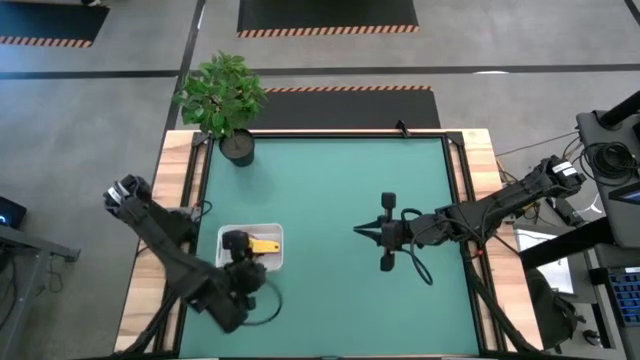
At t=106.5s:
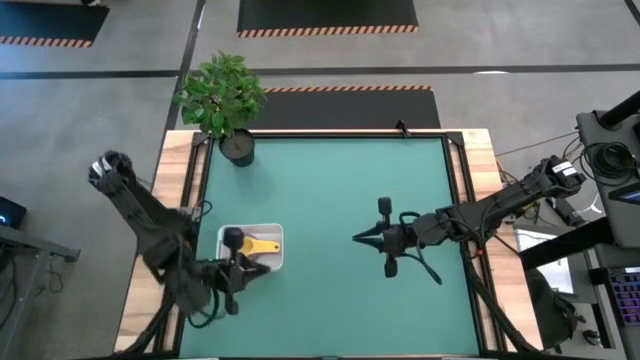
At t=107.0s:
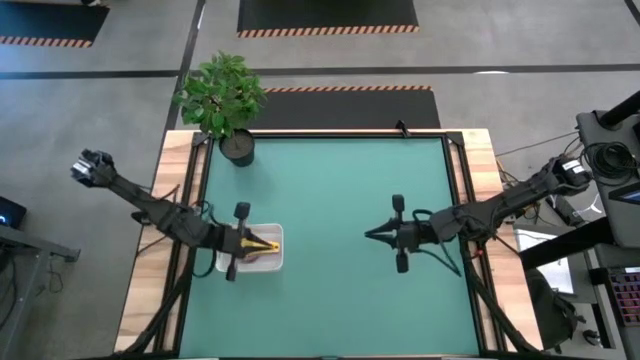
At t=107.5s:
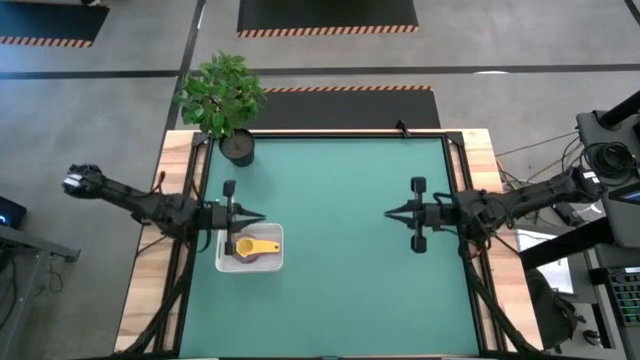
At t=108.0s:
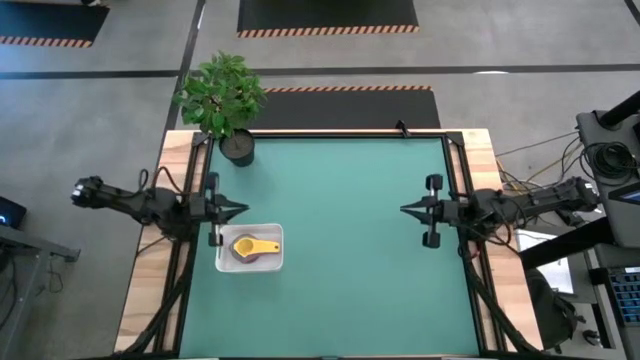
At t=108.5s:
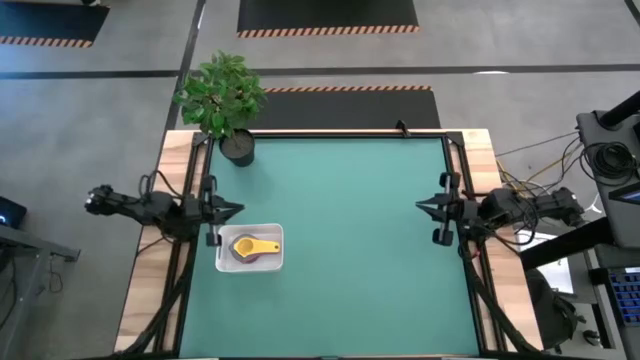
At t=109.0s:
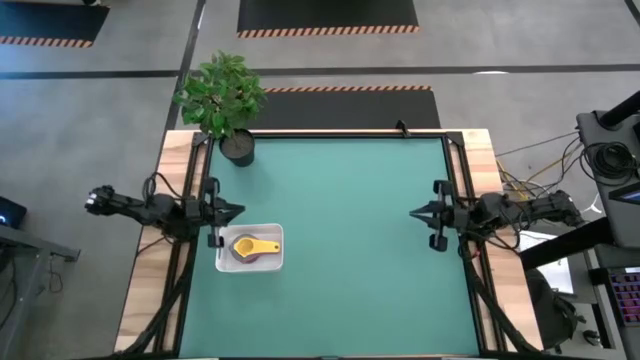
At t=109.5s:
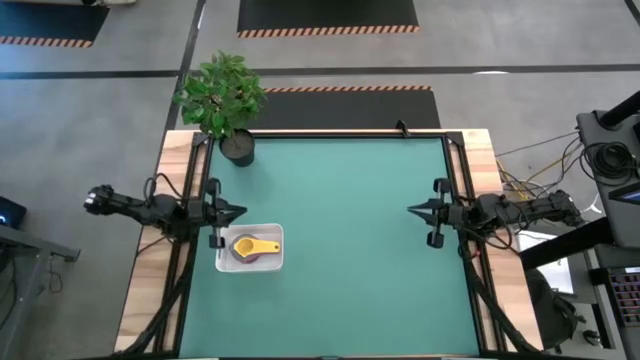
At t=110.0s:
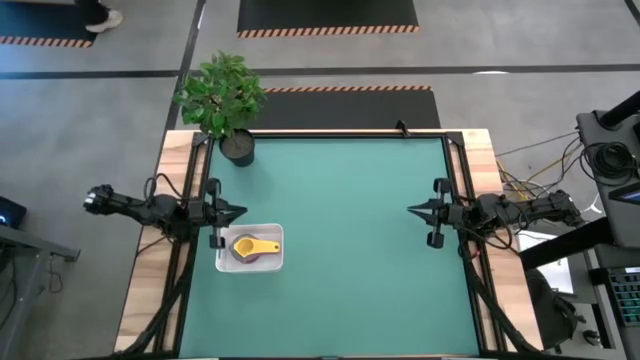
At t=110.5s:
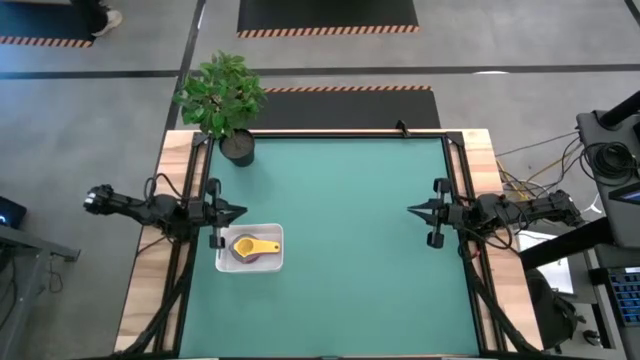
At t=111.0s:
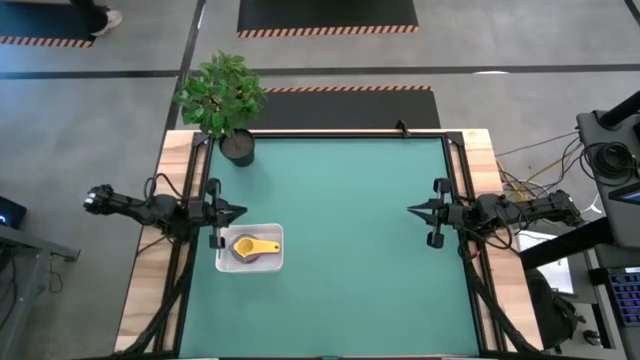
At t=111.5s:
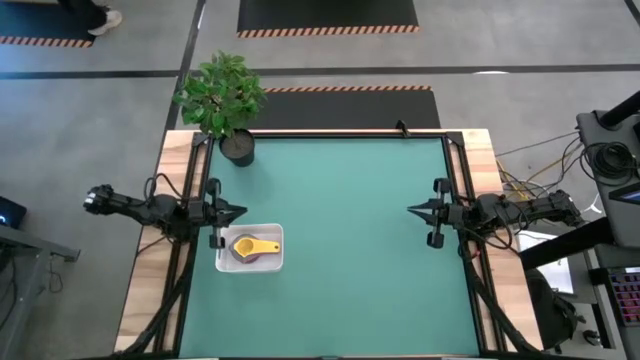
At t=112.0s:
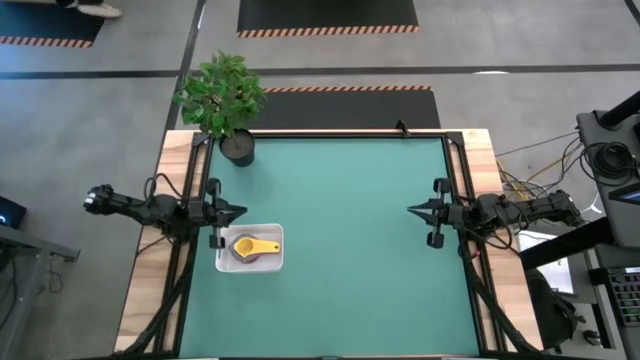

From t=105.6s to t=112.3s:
Task: Nest measuring cups in basket
Return to Home Position

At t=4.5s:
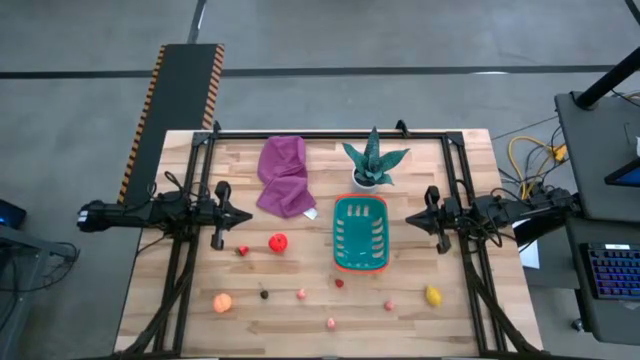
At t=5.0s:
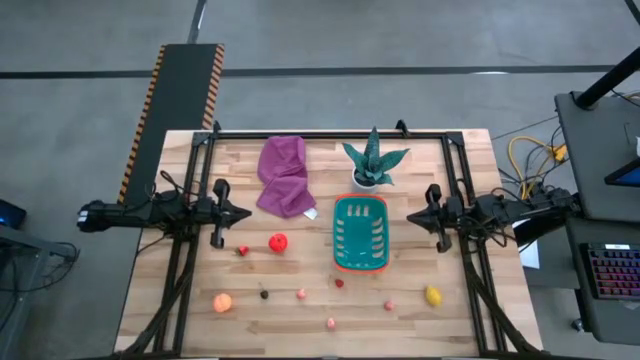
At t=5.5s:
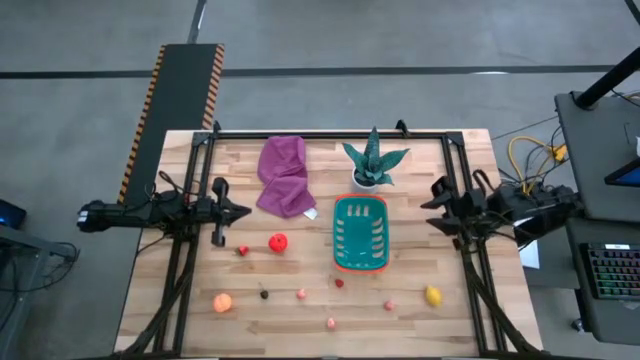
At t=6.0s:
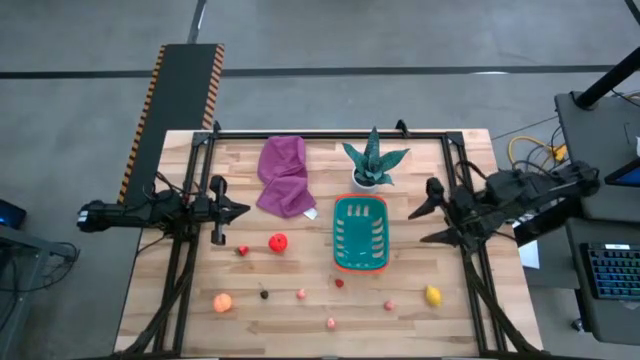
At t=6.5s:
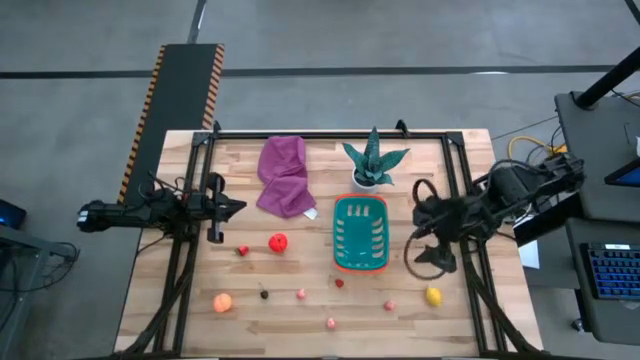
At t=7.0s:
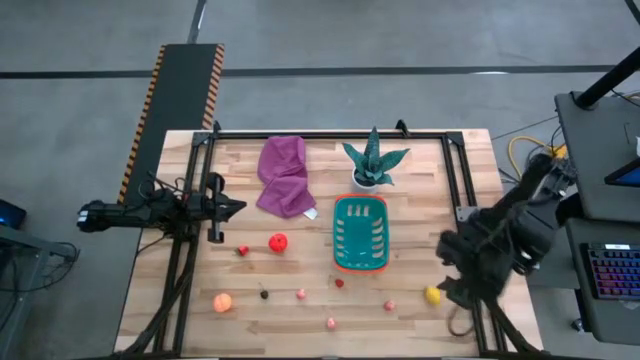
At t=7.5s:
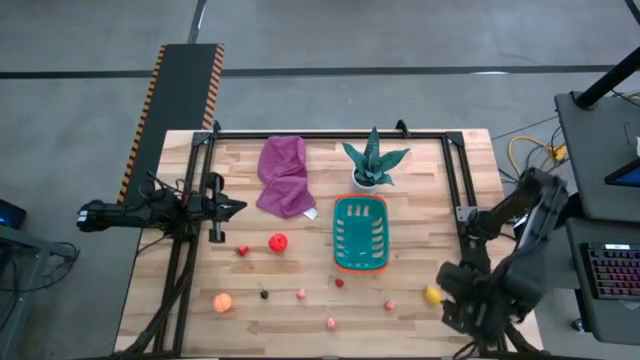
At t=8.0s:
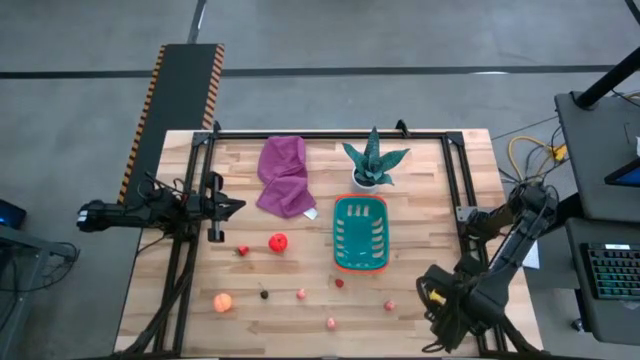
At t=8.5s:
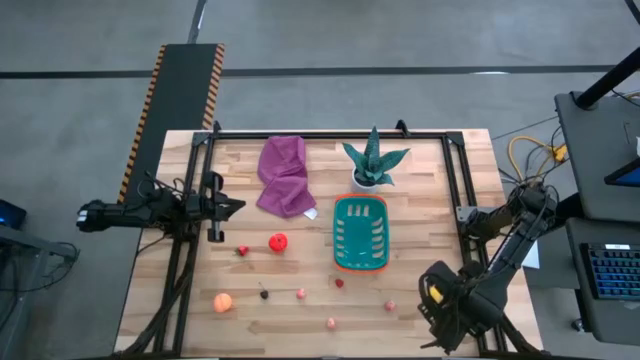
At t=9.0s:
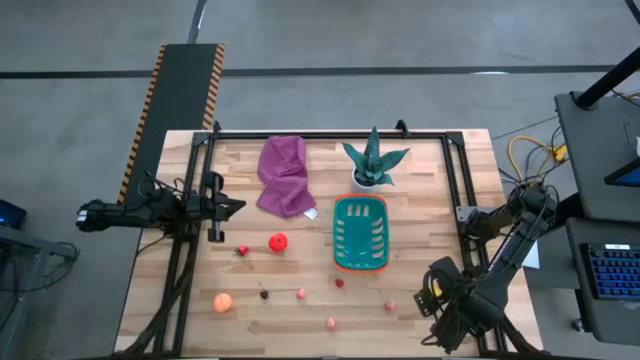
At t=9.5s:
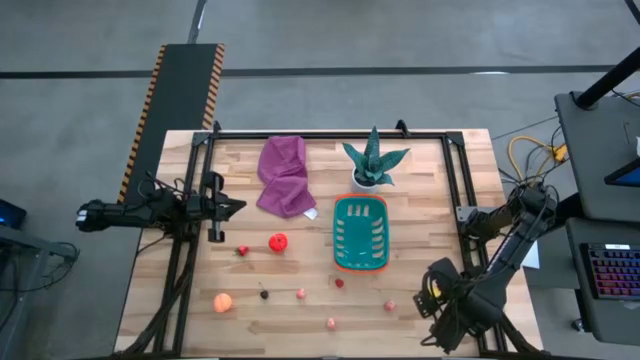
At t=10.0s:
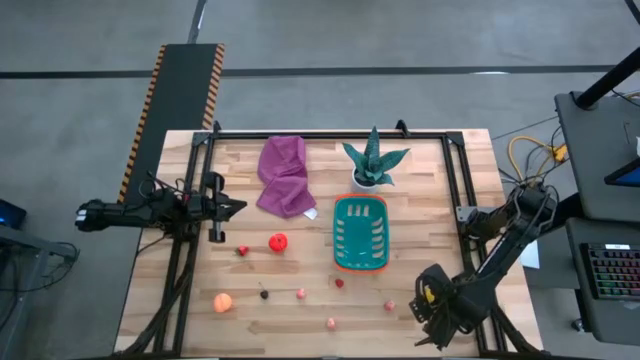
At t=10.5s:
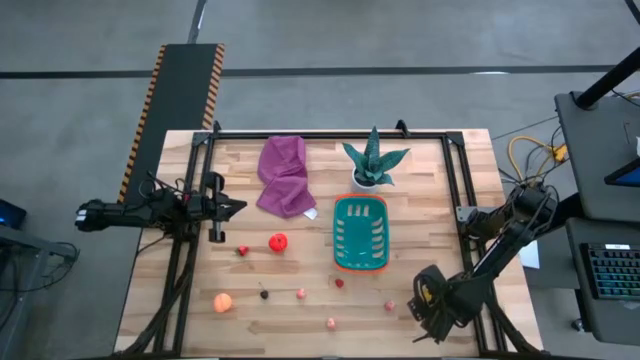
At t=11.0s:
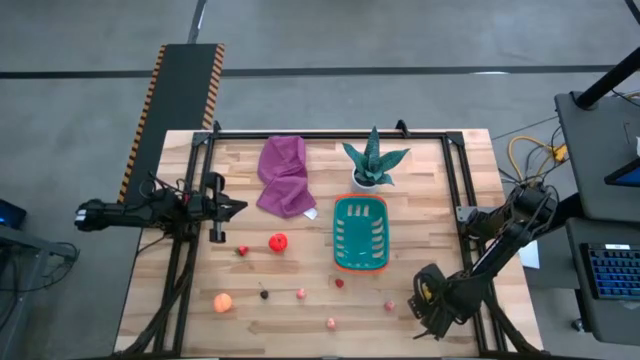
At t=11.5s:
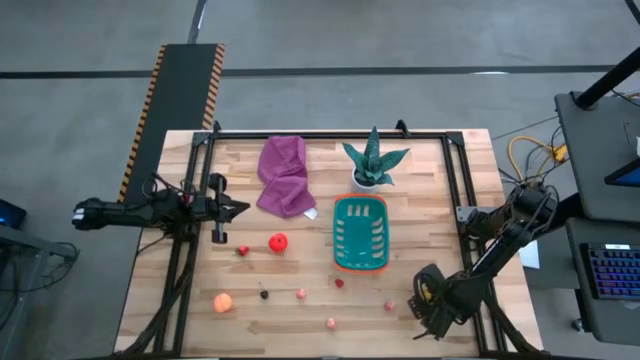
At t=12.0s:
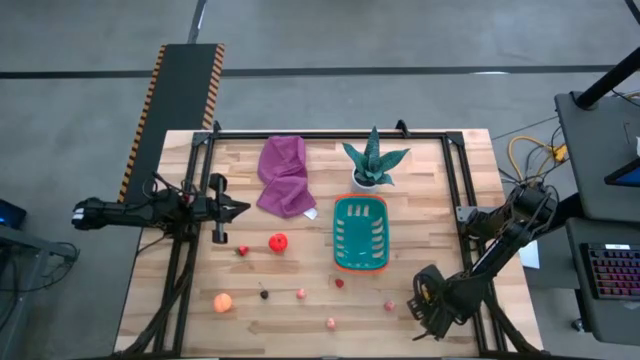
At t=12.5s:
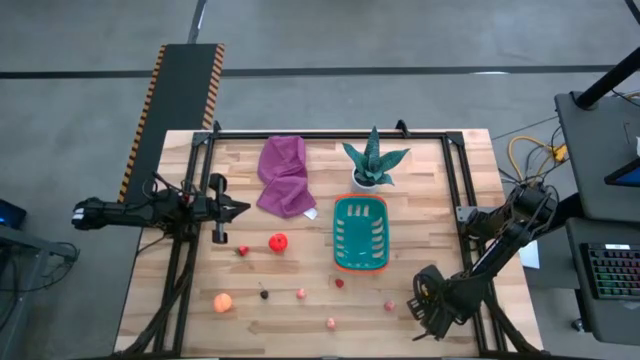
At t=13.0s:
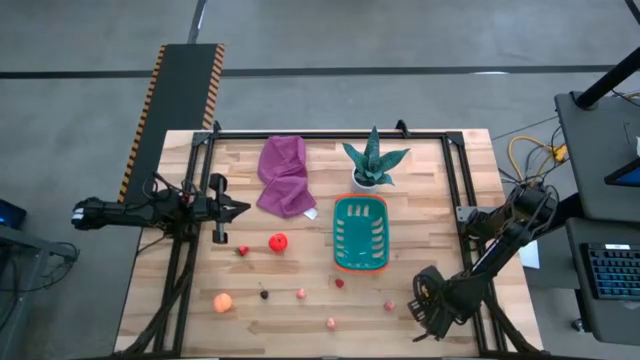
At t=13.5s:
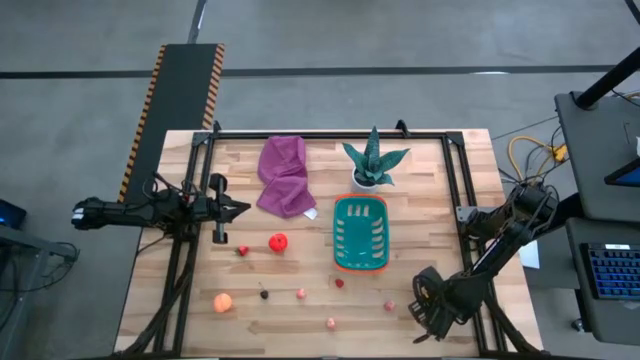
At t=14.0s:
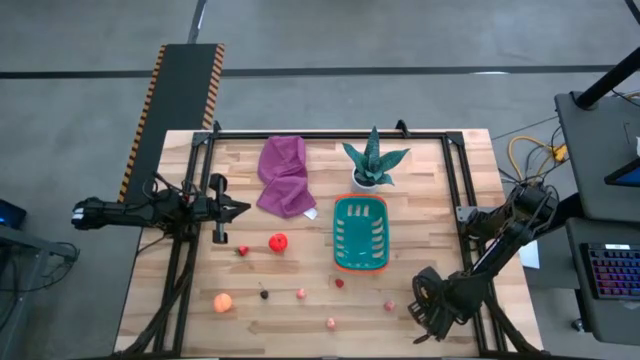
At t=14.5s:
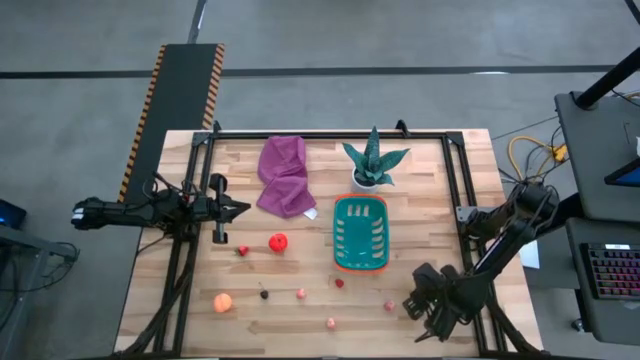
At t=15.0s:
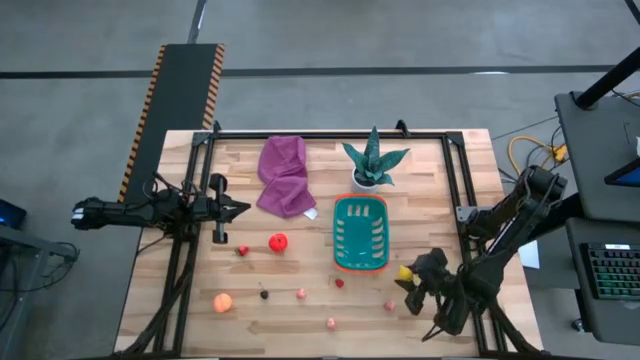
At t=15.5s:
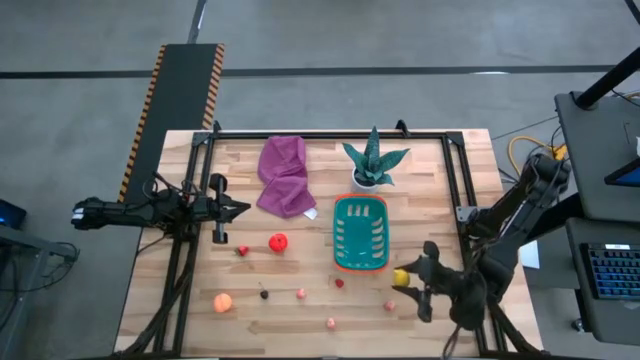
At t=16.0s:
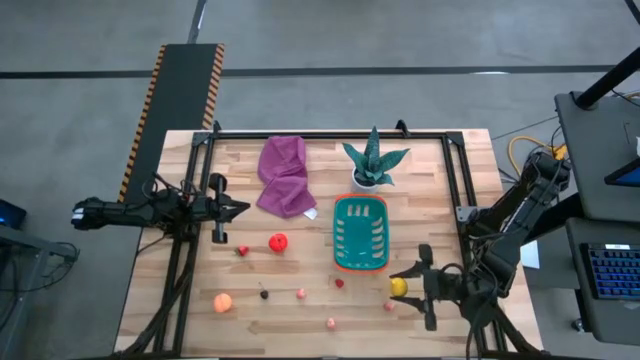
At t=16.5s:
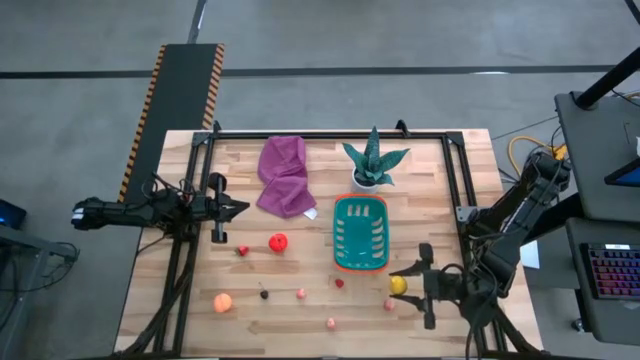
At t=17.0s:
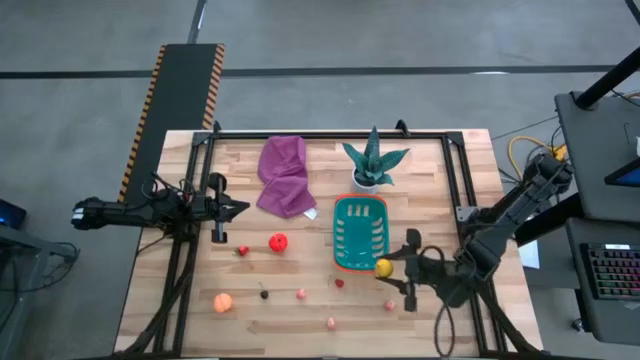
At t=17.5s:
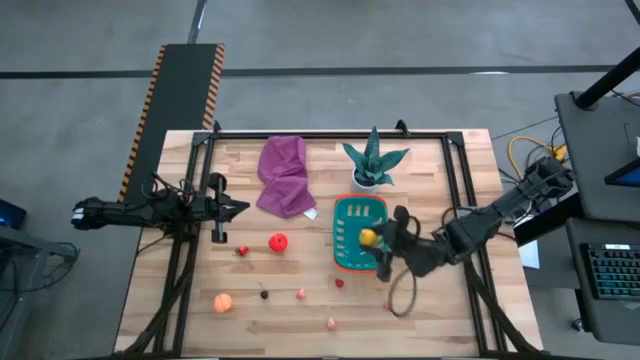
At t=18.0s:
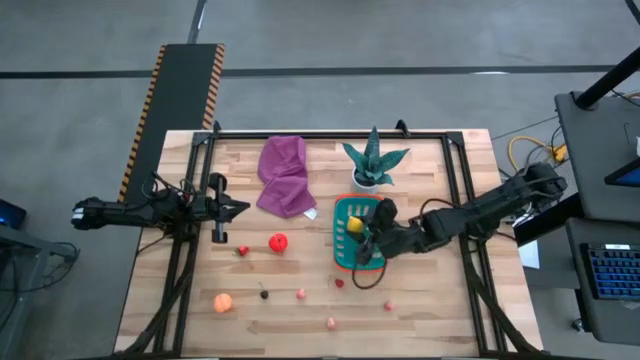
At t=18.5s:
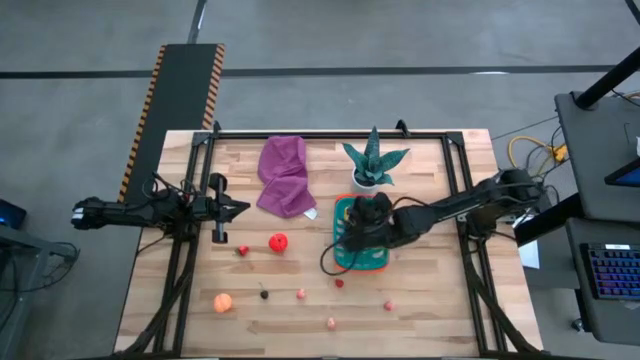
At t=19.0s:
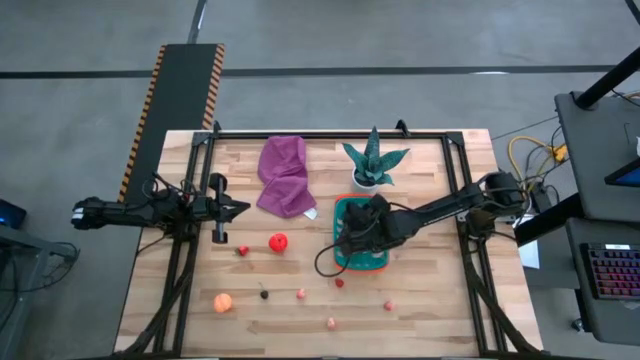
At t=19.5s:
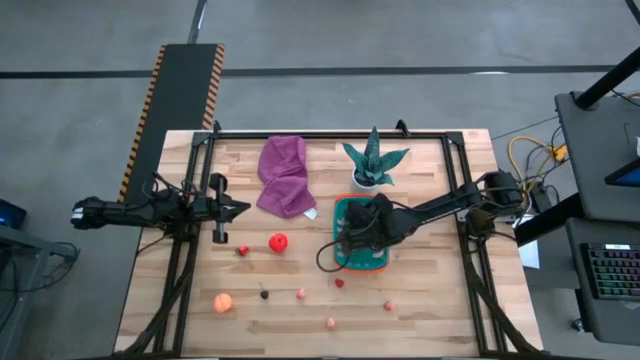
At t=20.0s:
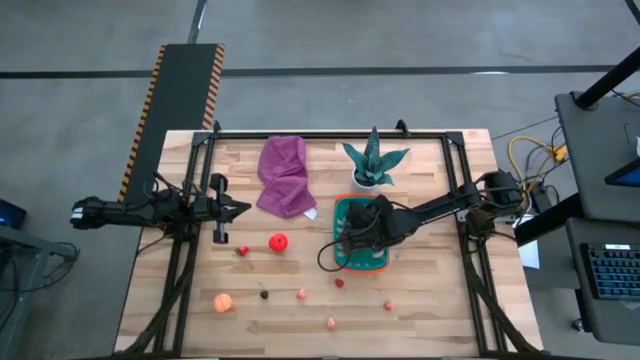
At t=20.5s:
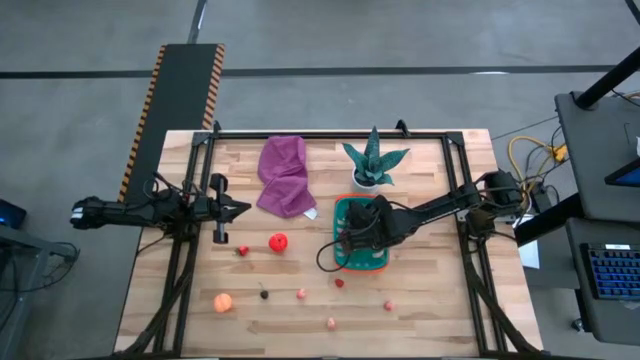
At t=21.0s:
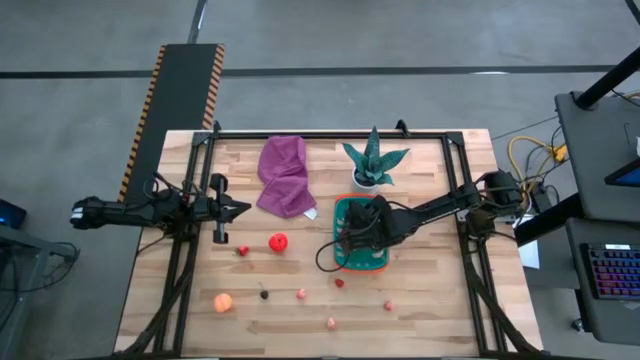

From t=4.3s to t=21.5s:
Task: Pick and placing Produce into tupperware
Put the yellow lemon into the blue basket
